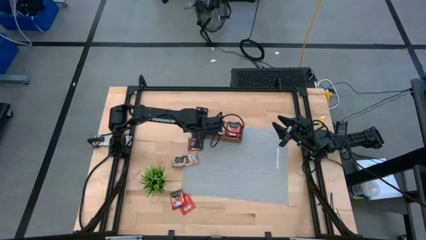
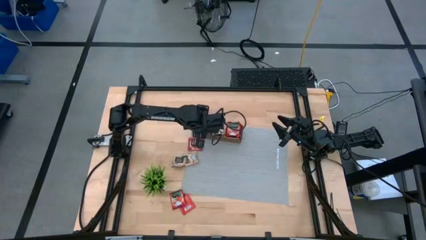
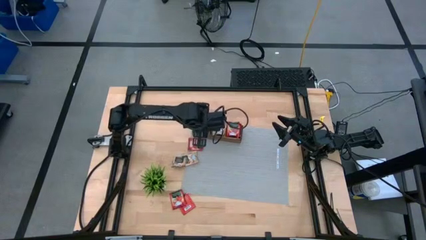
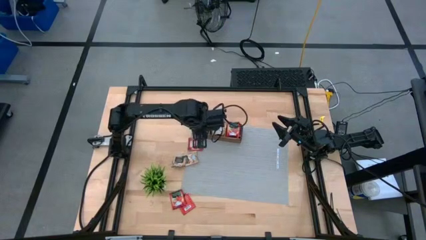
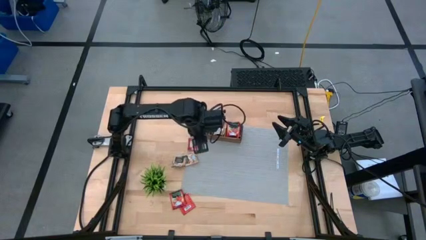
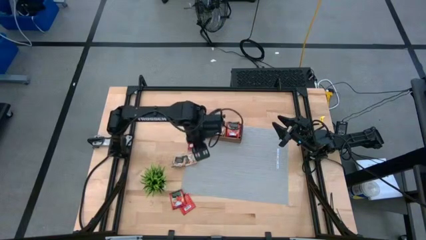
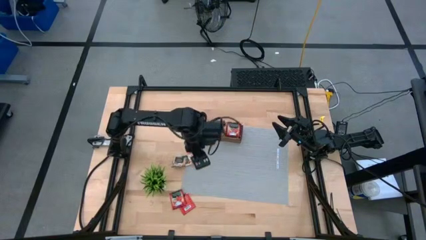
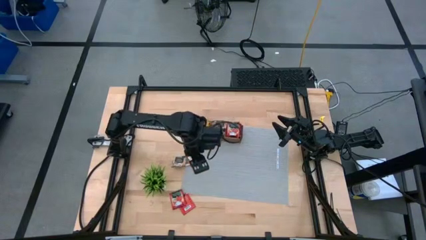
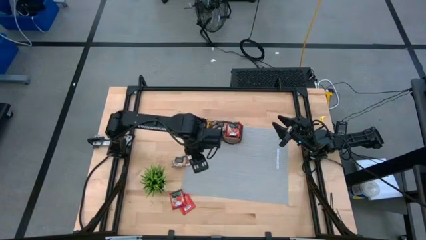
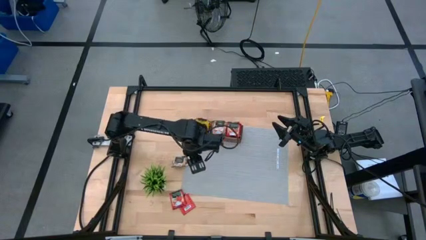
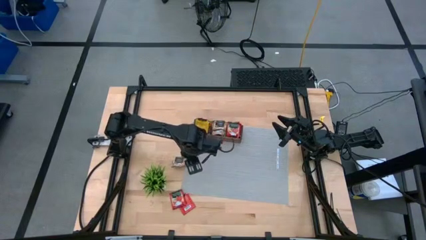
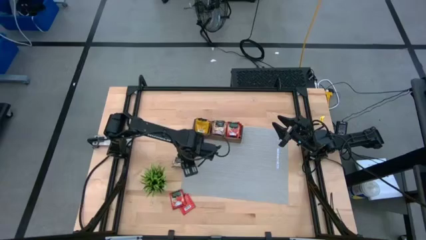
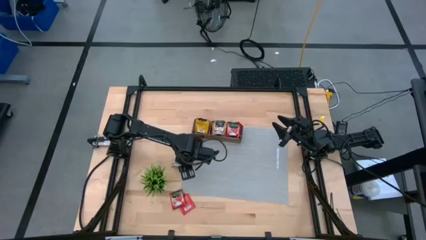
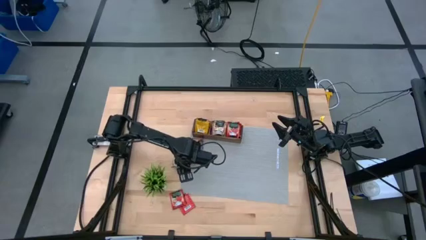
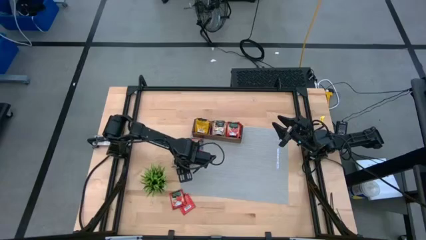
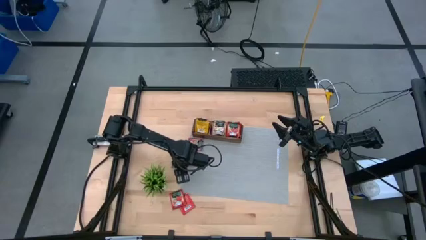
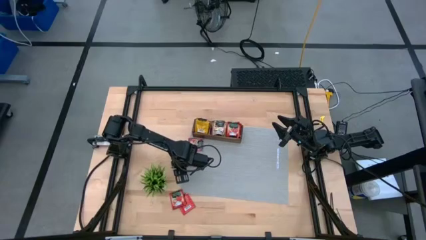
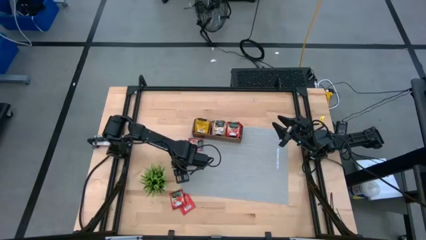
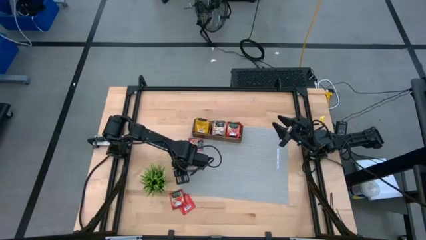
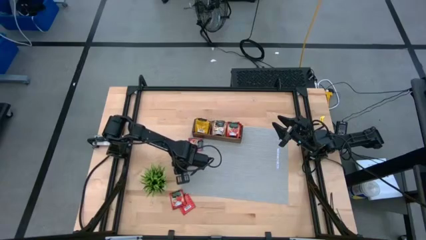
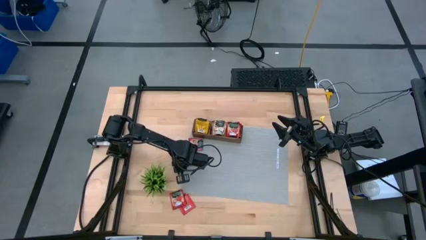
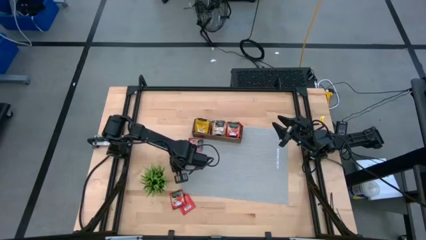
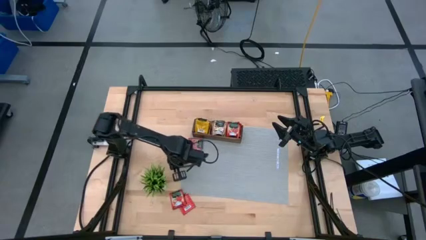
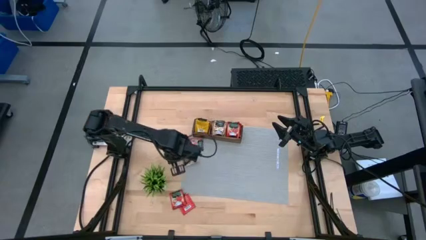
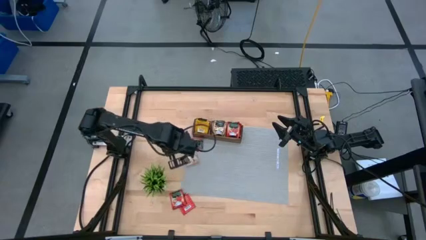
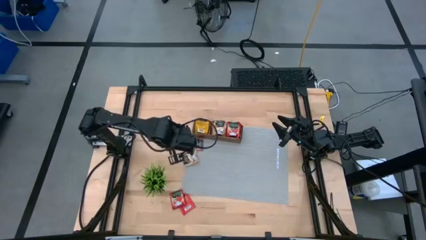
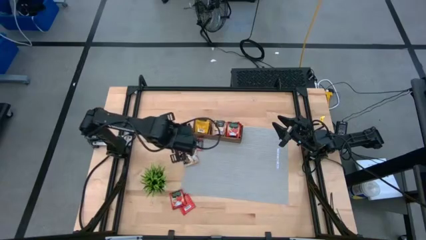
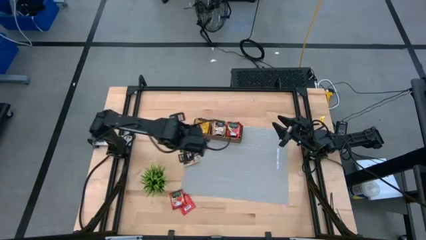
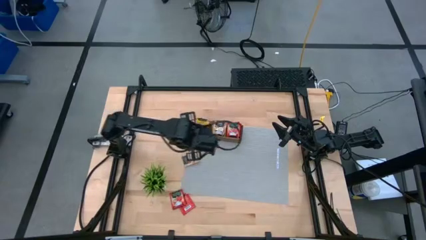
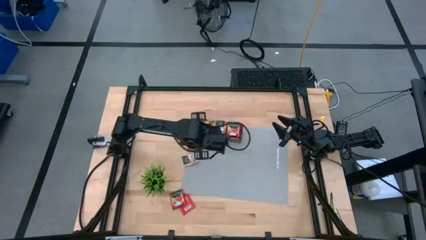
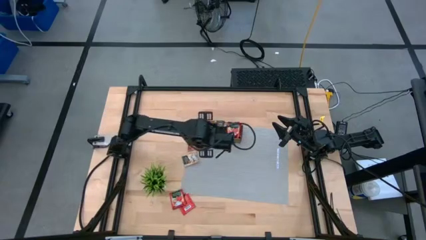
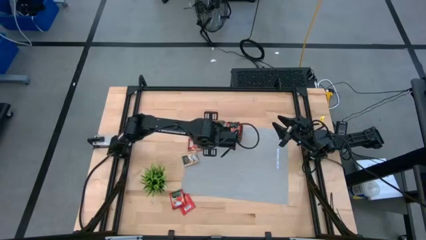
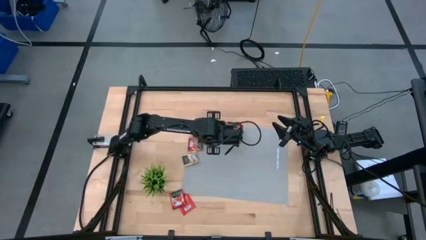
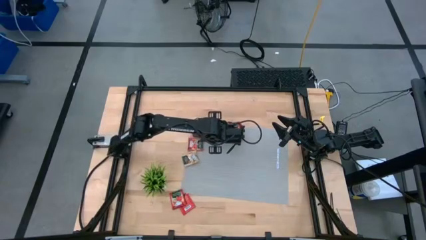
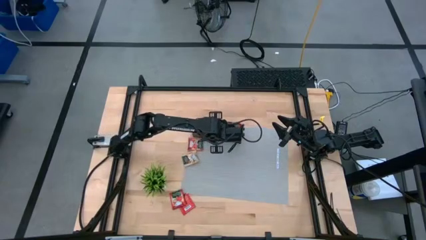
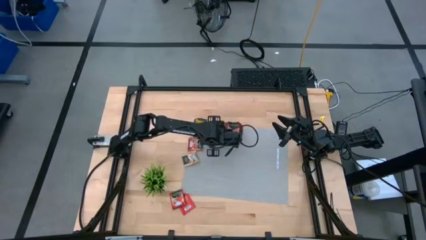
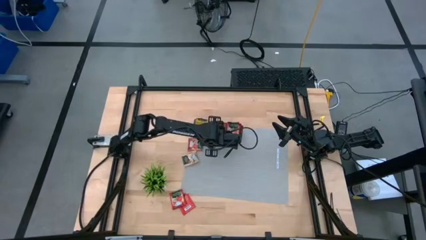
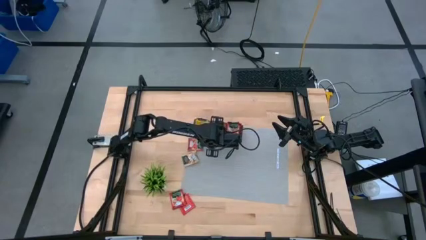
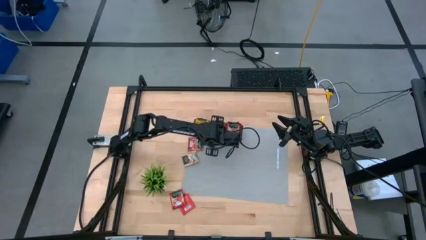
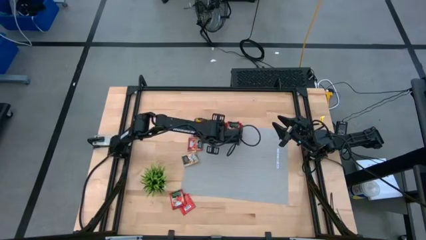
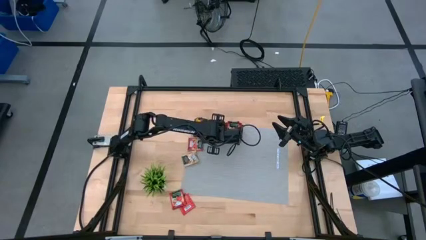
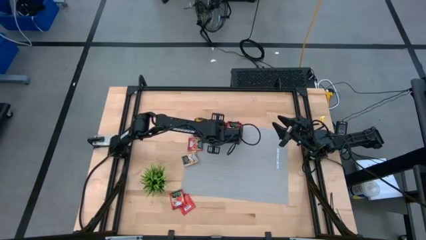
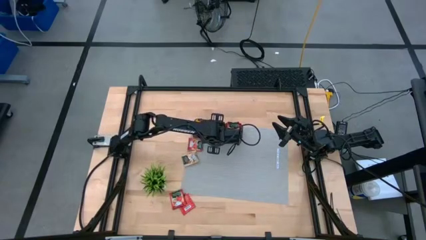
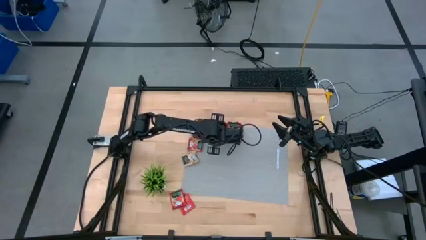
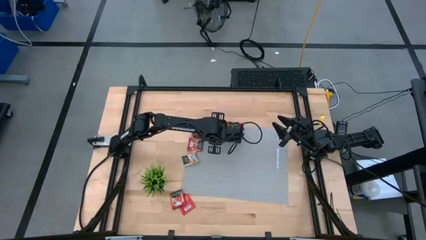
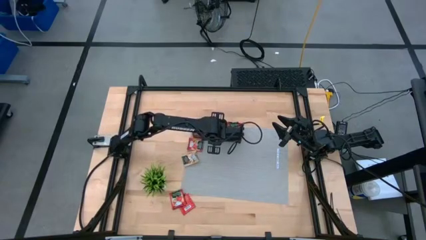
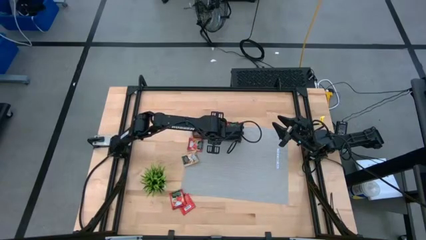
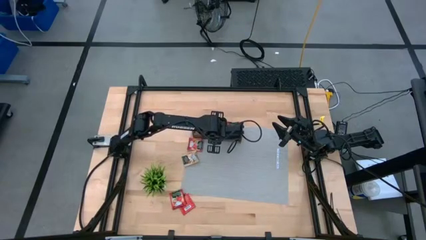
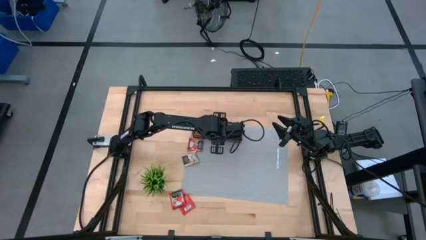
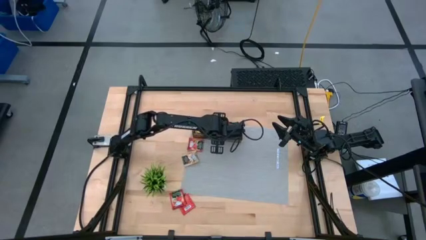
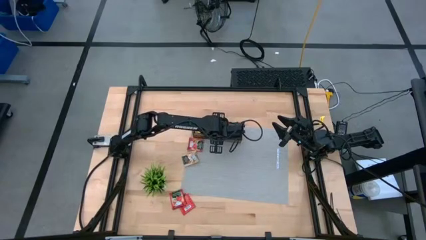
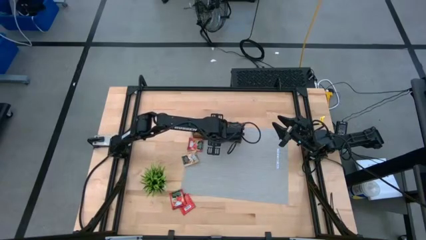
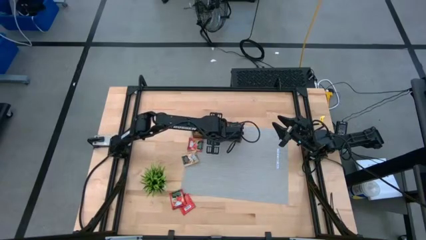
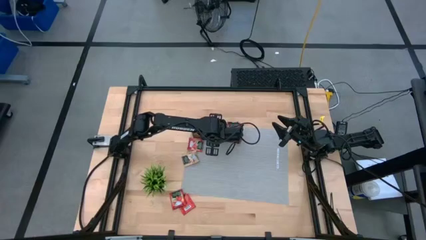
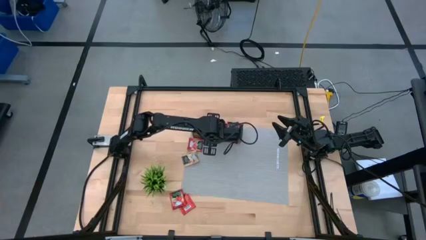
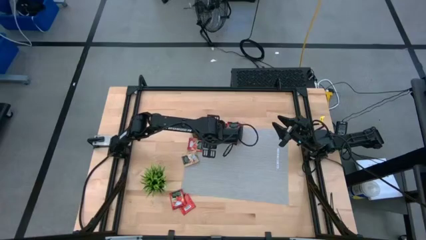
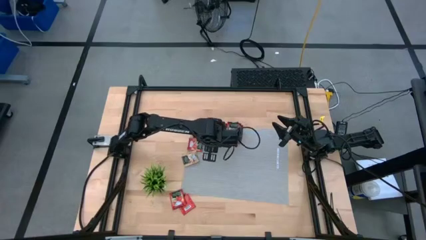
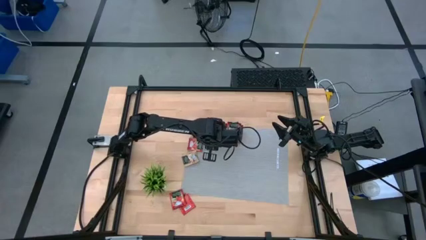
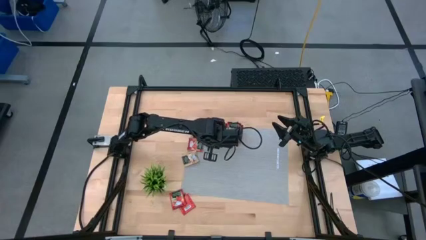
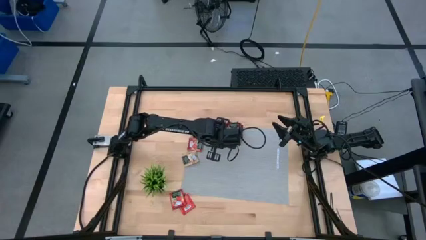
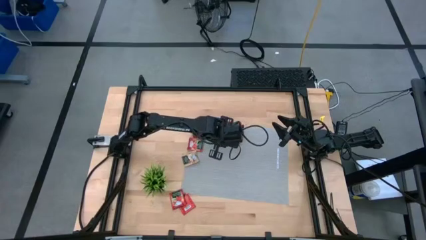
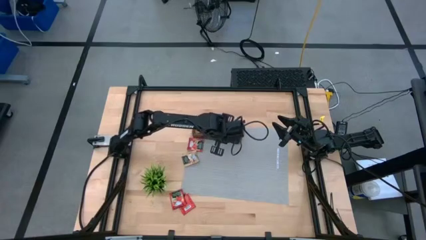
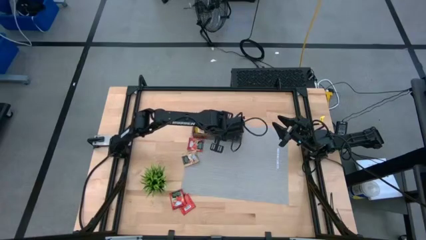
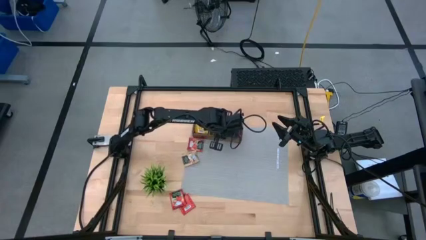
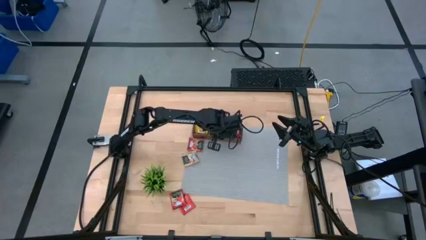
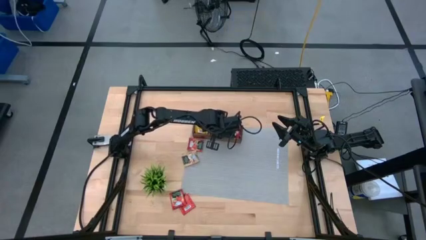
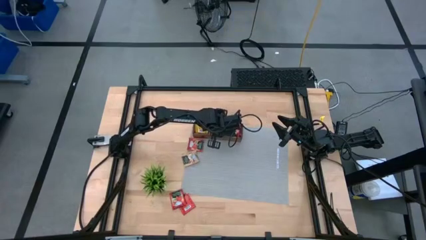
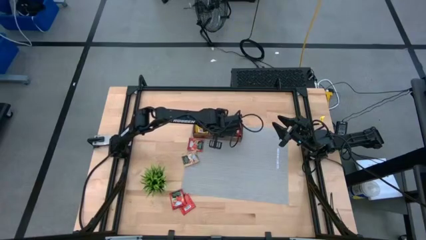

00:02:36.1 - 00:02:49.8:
Task: Pick & Place Tea
Put the gold tea bag into the middle section of the wooden organizer
